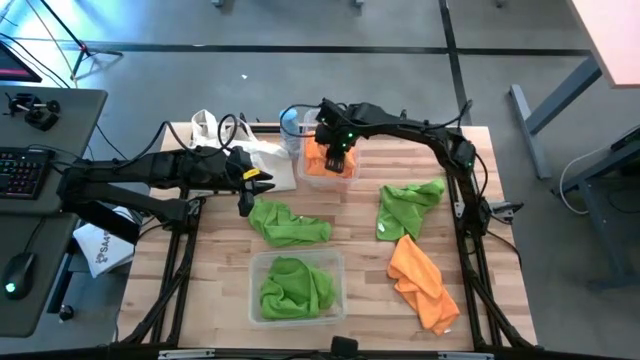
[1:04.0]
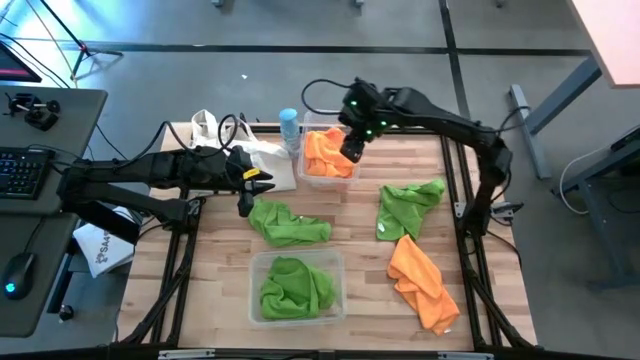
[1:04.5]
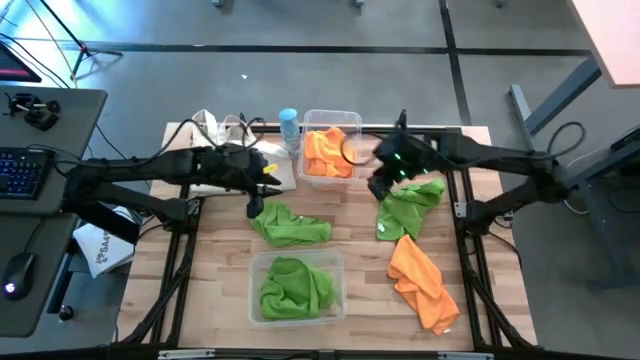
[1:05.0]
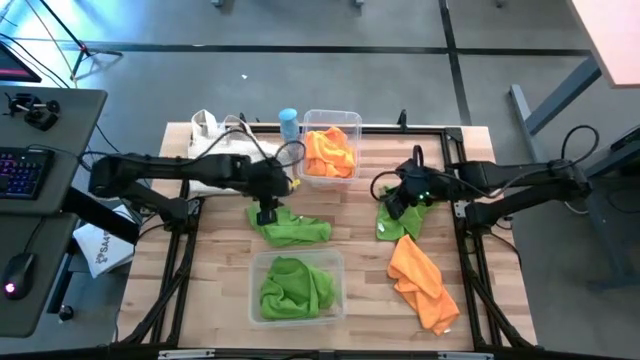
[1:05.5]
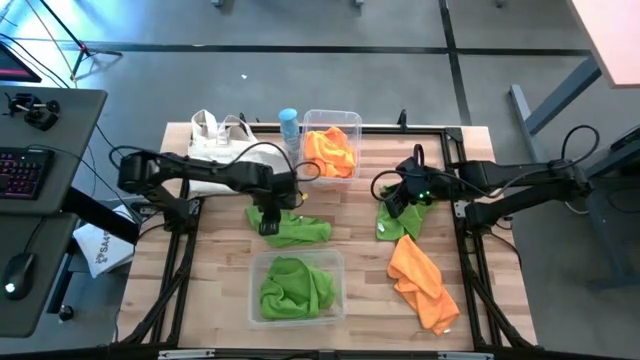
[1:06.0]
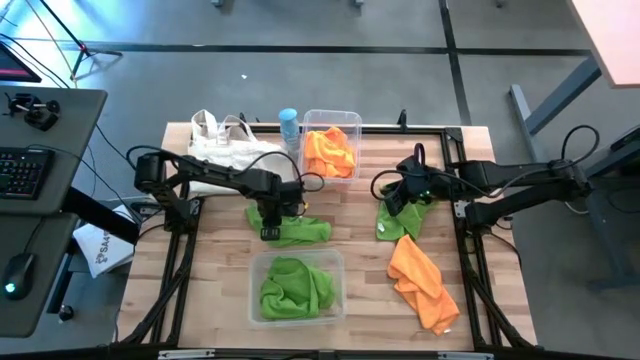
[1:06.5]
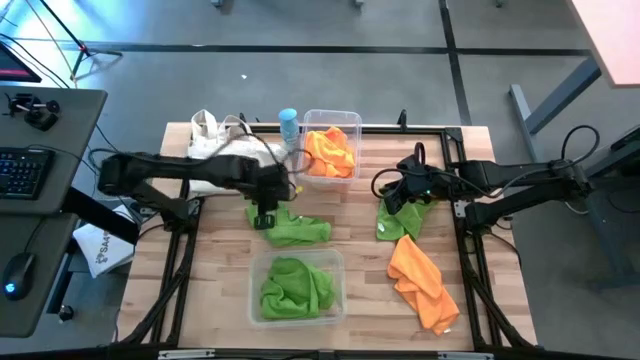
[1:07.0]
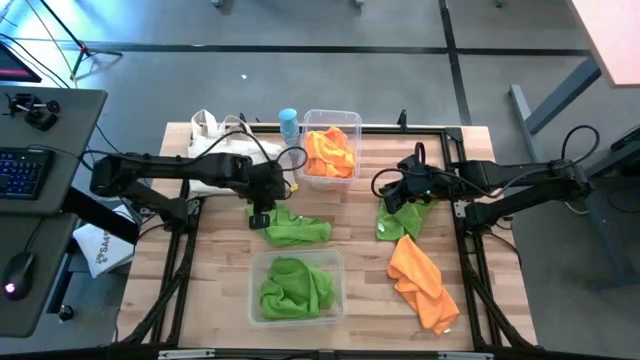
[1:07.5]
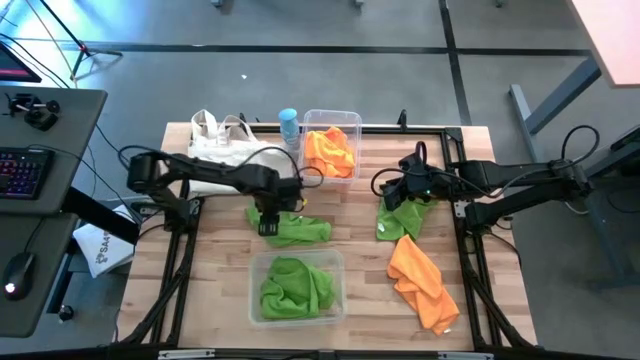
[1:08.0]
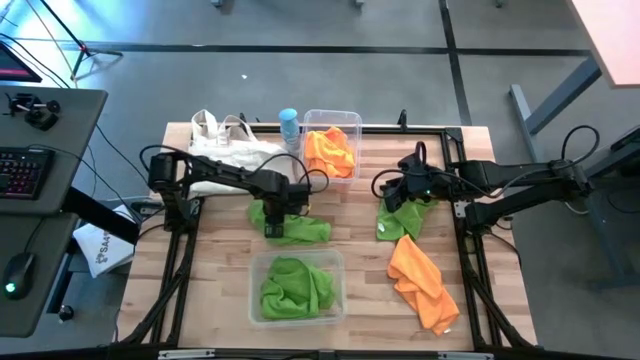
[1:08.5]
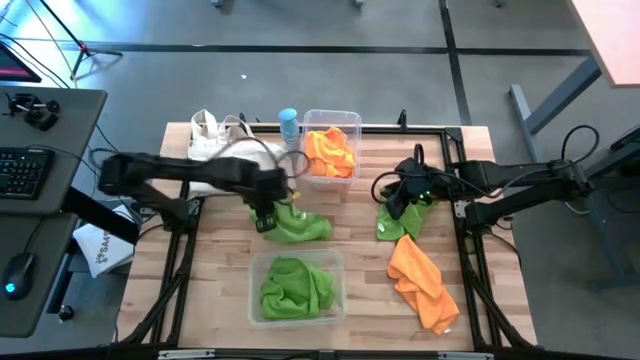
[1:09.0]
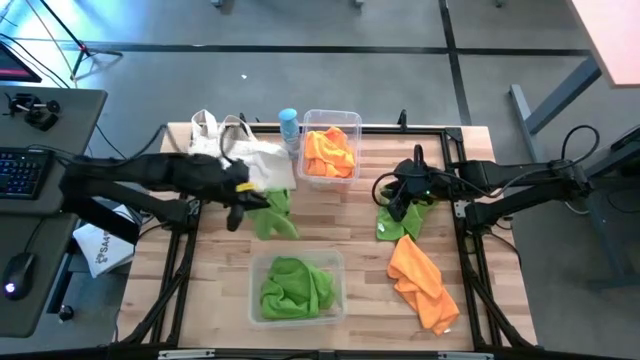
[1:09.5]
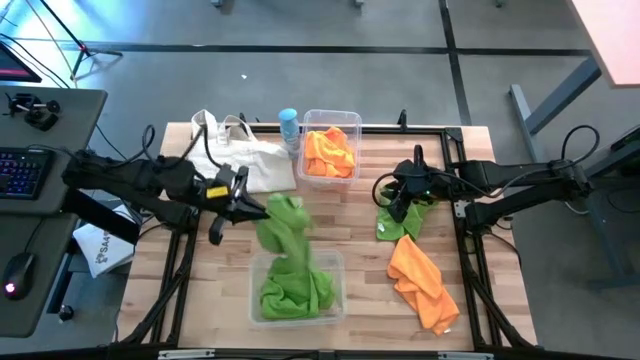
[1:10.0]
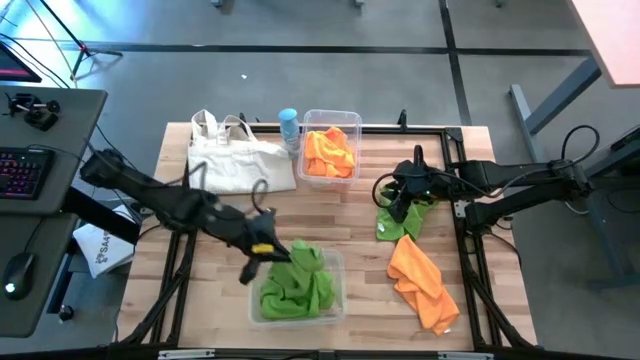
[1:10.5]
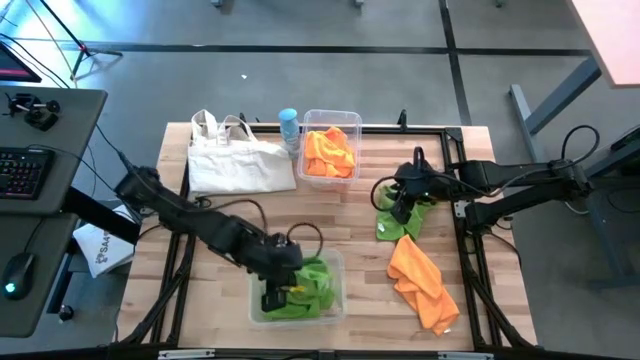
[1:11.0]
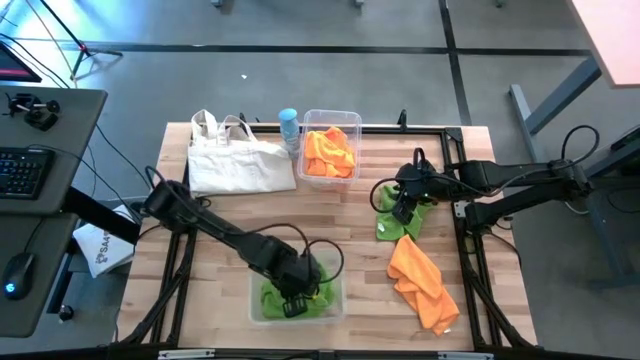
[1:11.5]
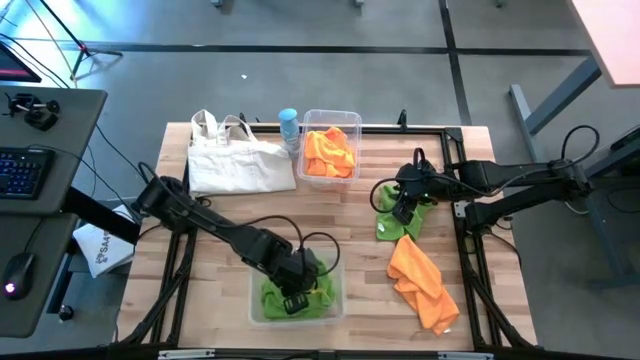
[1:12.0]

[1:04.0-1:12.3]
Task: Sort microfiber towel by color & place in baskets
Put the green microfiber cloth into the bottom transparent bin

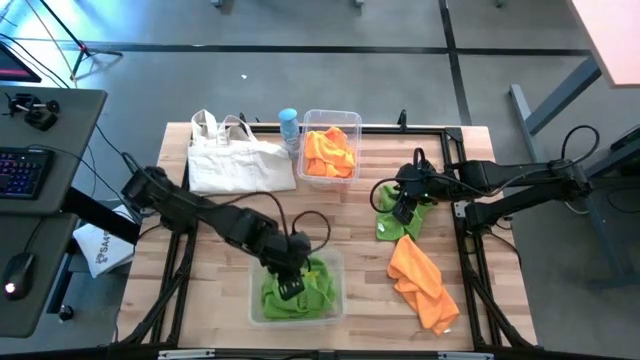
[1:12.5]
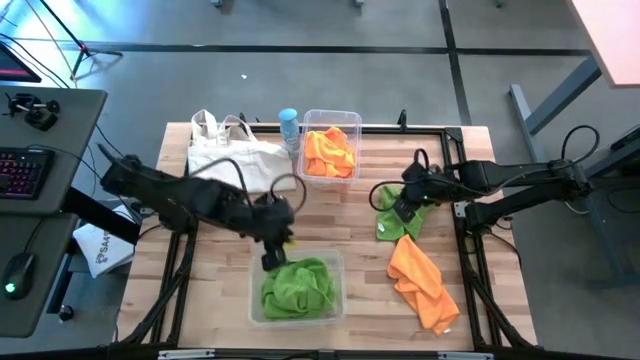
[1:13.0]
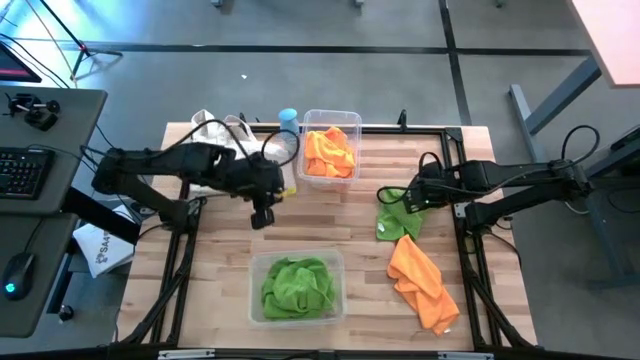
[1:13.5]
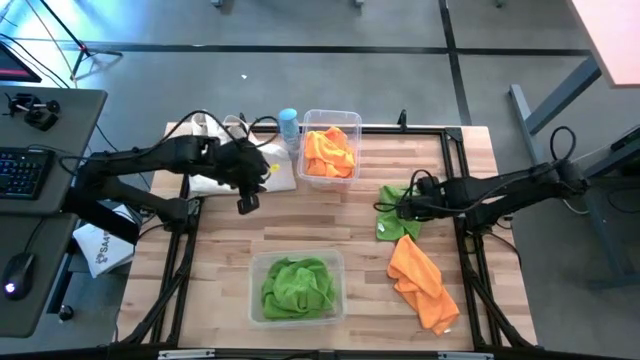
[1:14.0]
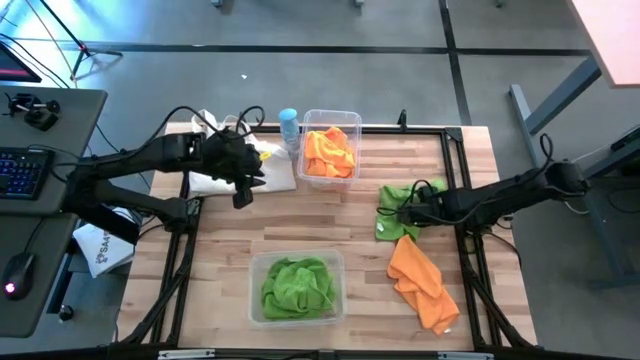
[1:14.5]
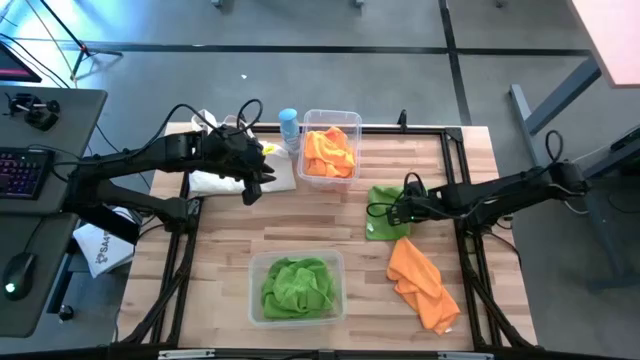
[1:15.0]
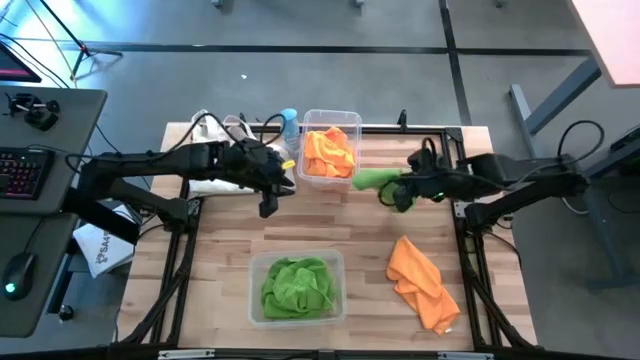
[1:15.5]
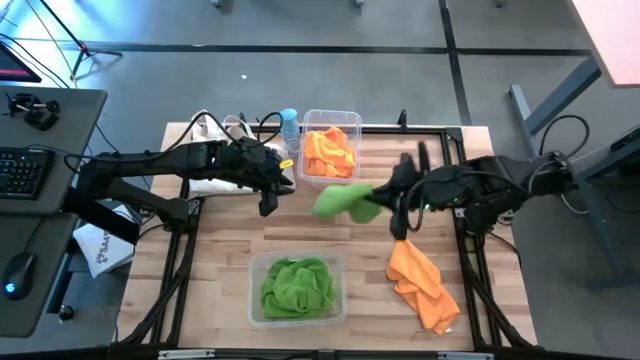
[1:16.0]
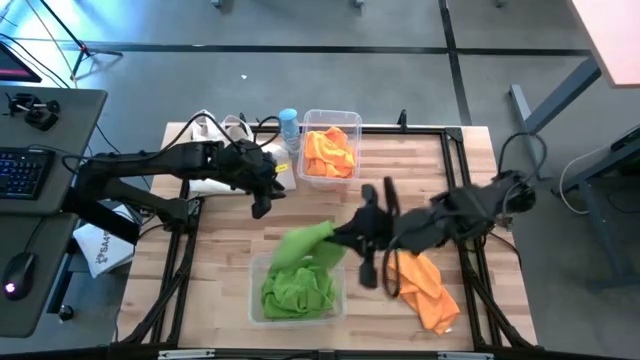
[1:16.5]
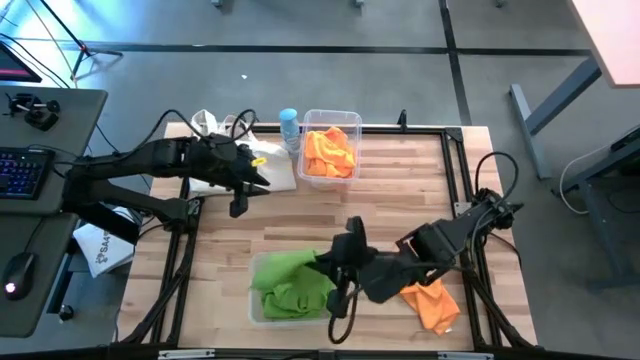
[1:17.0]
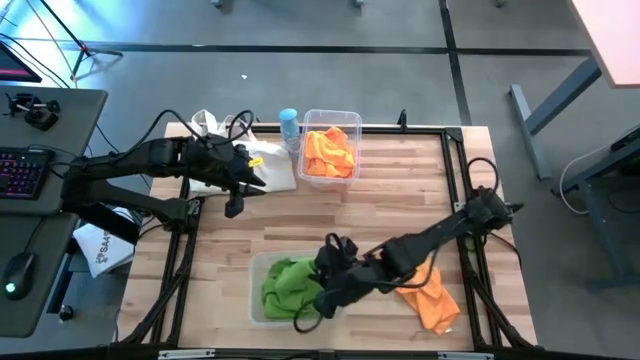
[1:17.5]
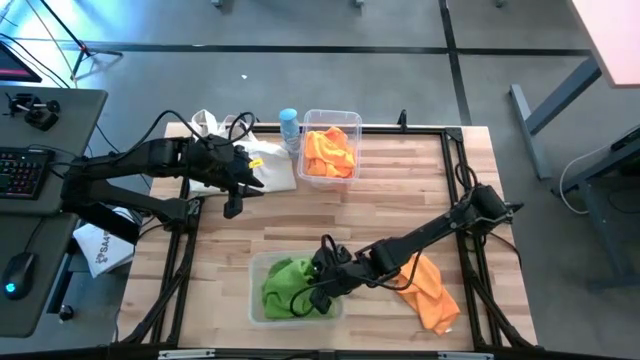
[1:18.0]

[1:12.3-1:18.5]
Put the green microfiber cloth into the bottom transparent bin

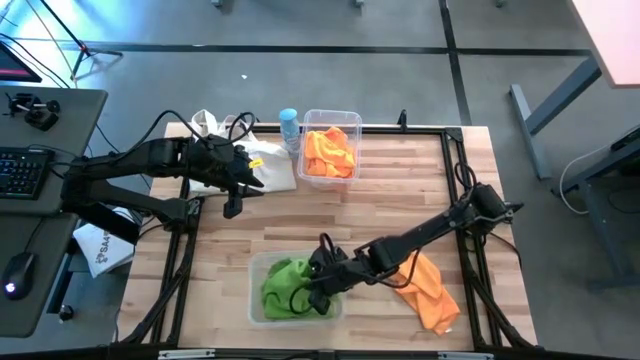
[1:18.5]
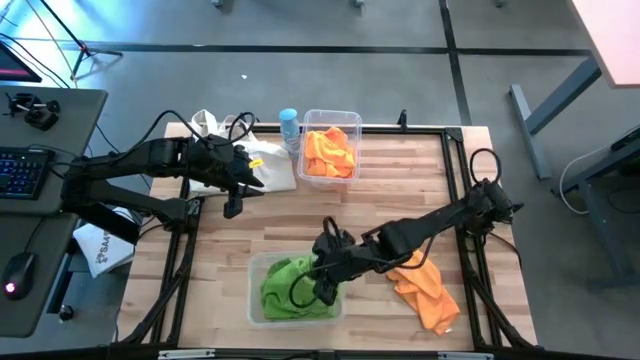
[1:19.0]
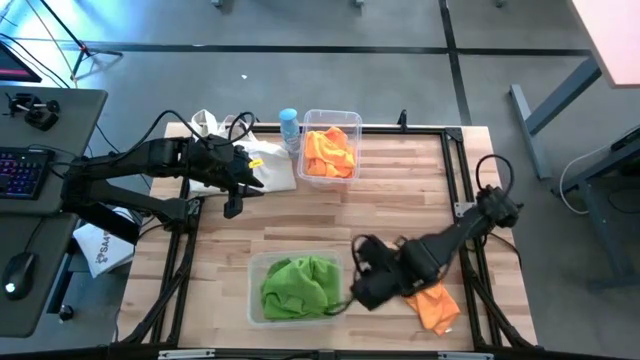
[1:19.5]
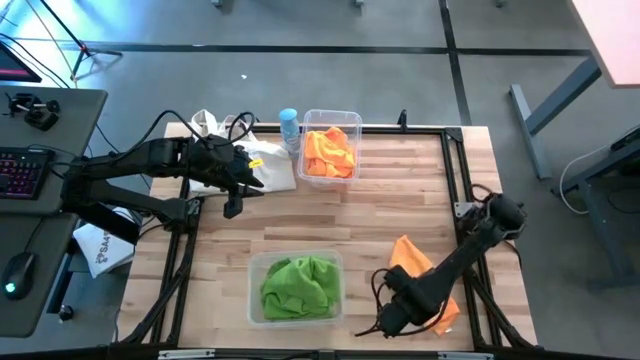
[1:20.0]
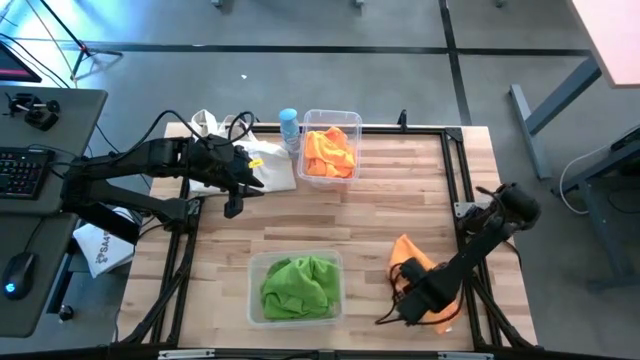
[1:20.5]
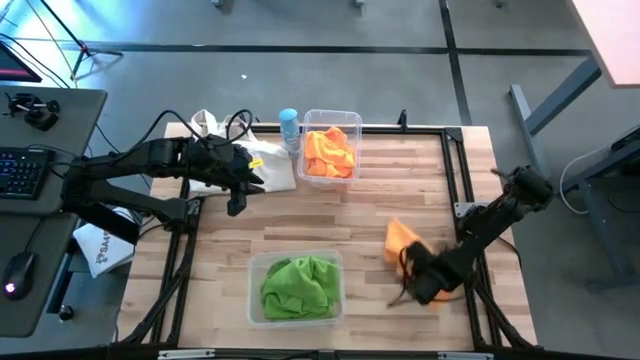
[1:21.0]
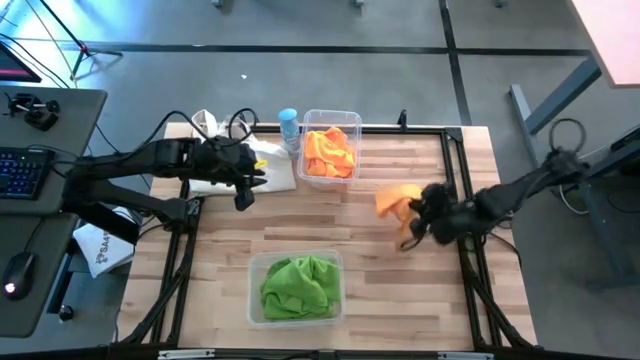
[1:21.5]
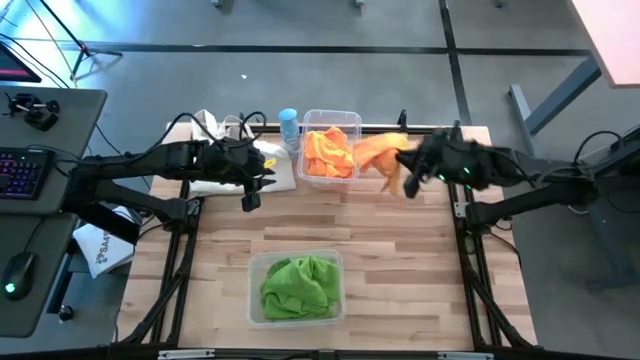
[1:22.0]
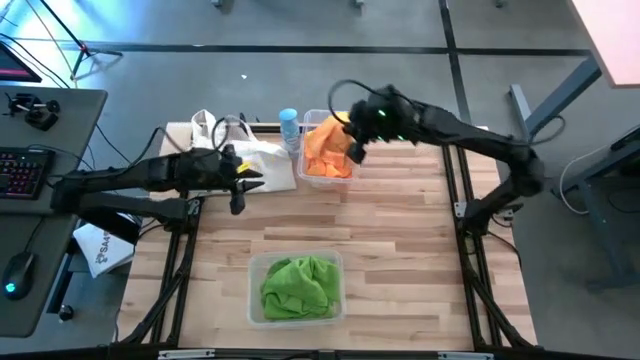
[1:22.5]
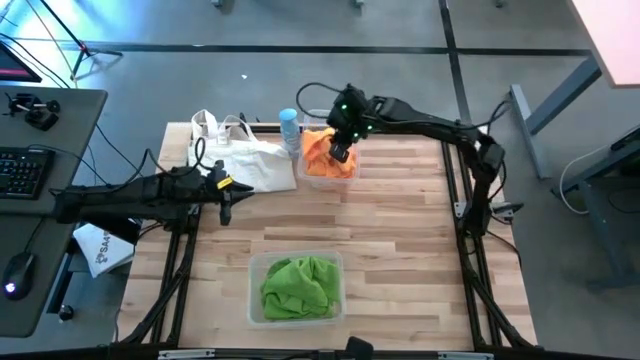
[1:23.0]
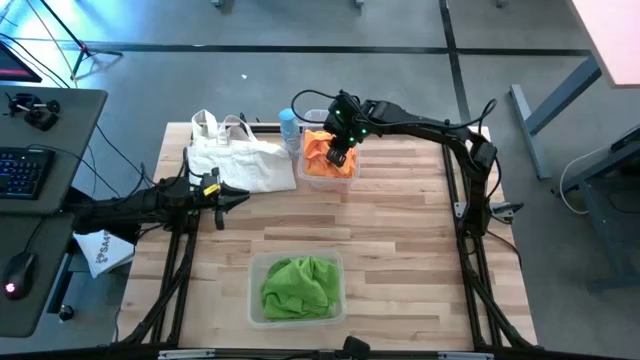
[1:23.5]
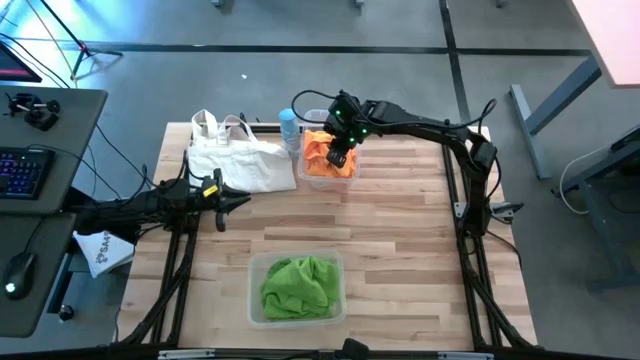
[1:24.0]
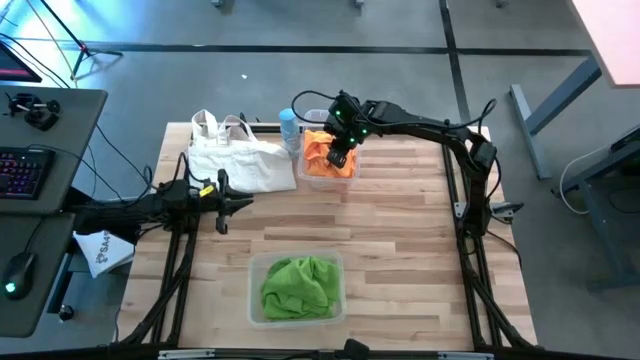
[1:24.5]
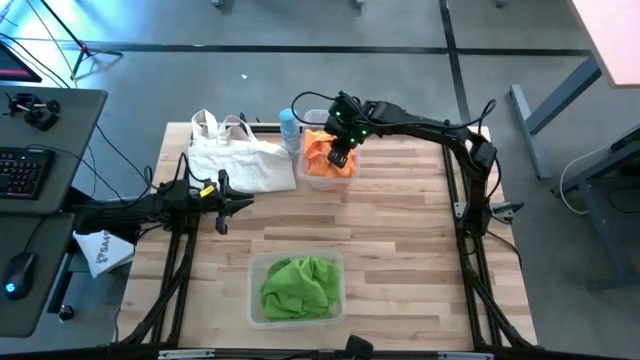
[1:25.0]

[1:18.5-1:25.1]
Put the orange microfiber cloth into the top transparent bin
